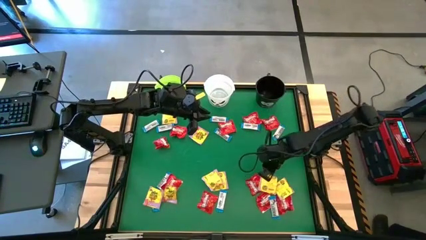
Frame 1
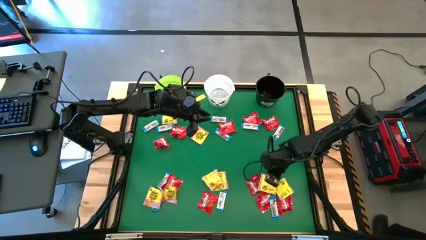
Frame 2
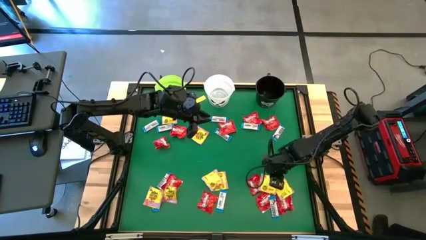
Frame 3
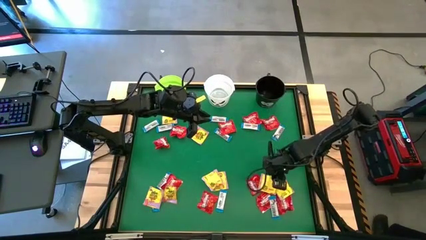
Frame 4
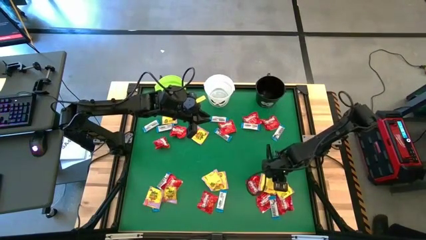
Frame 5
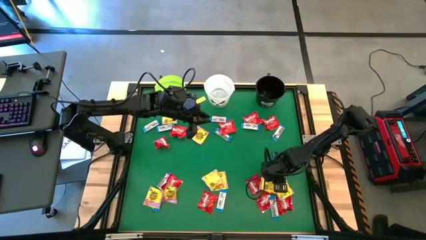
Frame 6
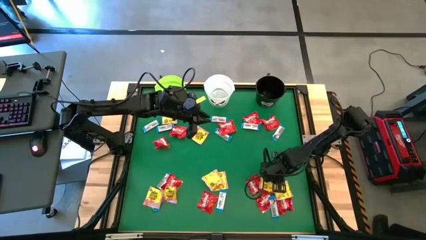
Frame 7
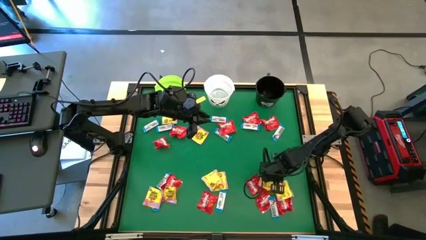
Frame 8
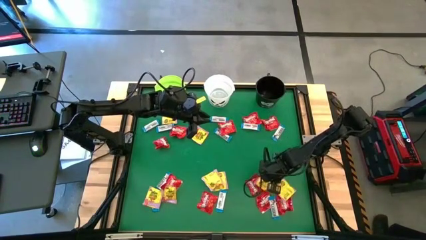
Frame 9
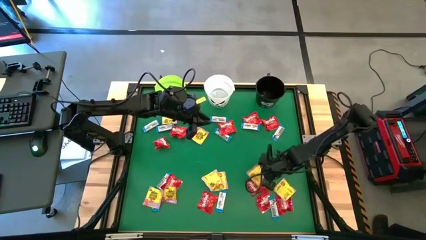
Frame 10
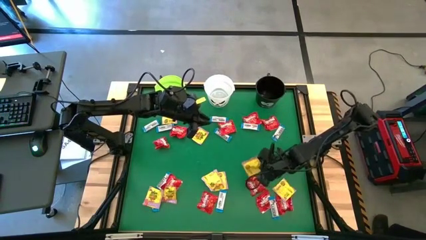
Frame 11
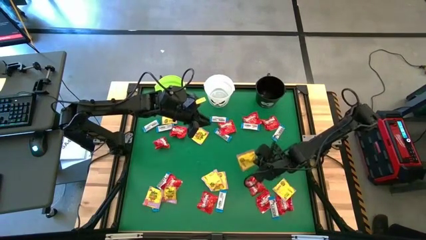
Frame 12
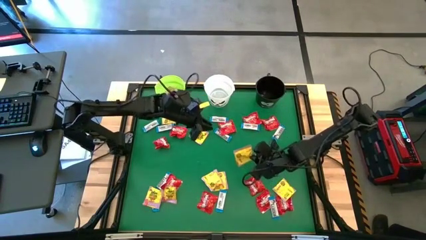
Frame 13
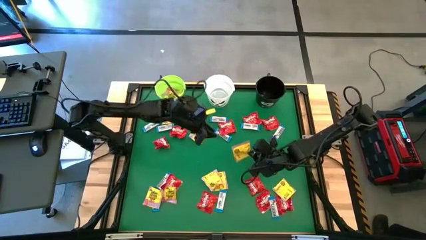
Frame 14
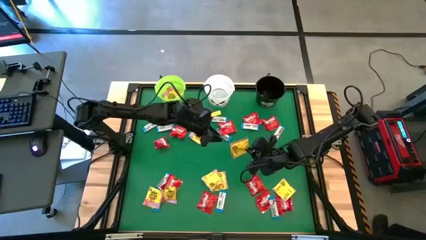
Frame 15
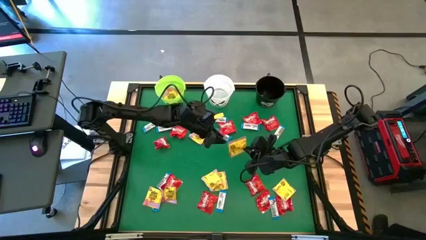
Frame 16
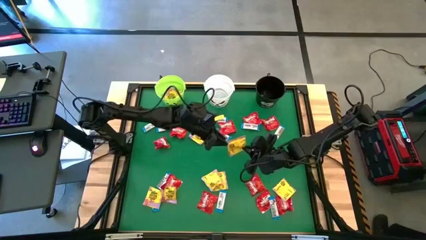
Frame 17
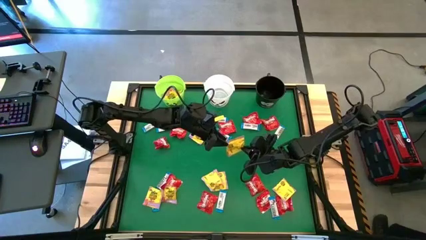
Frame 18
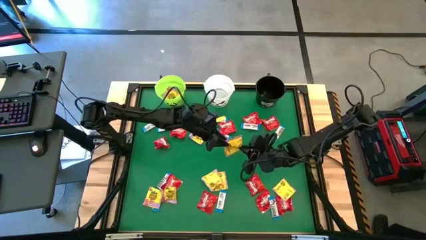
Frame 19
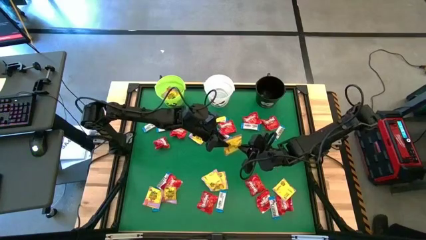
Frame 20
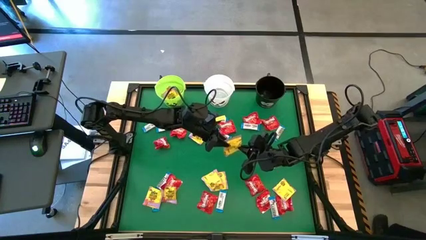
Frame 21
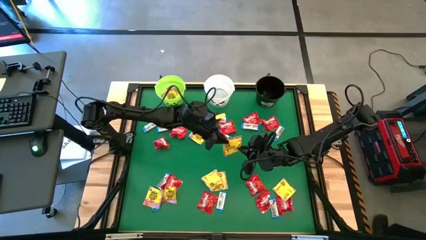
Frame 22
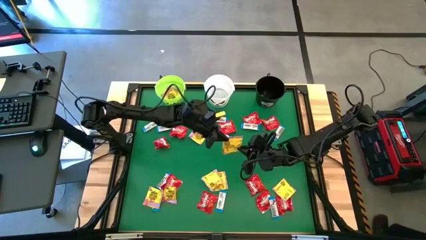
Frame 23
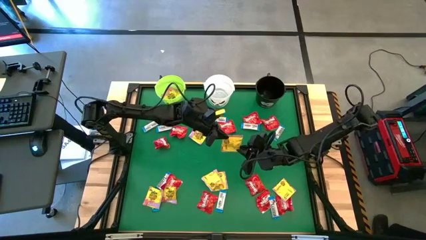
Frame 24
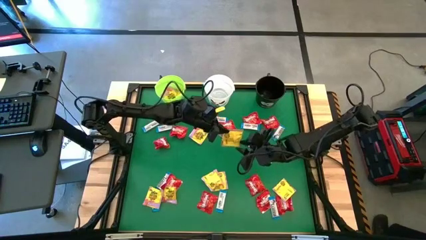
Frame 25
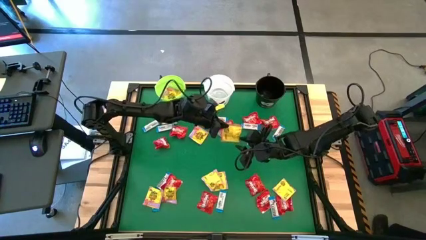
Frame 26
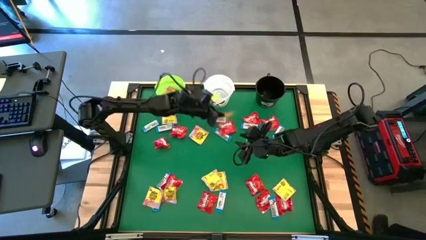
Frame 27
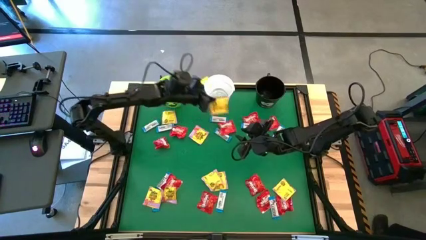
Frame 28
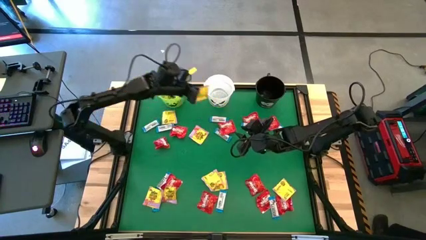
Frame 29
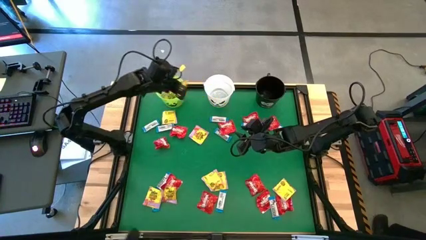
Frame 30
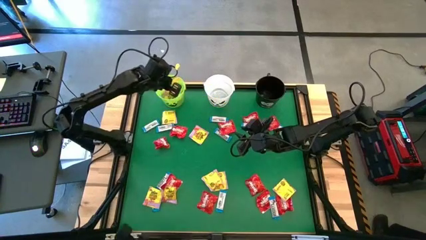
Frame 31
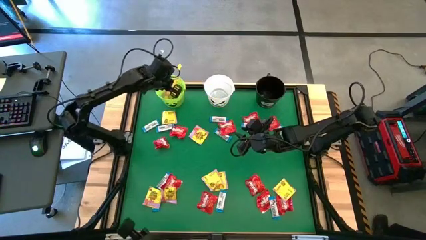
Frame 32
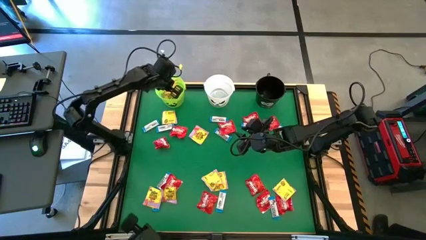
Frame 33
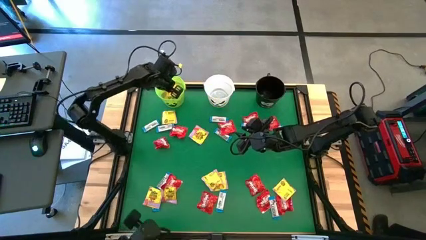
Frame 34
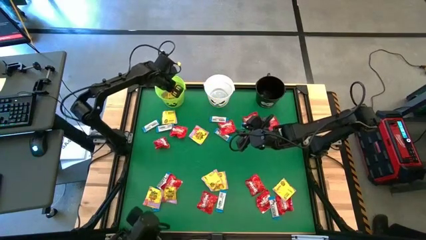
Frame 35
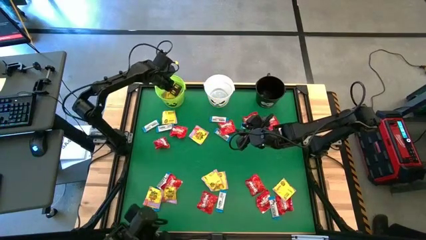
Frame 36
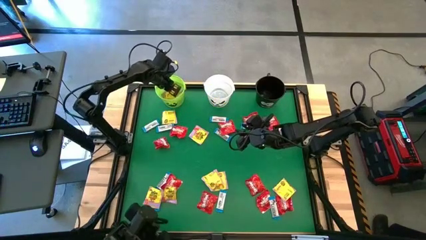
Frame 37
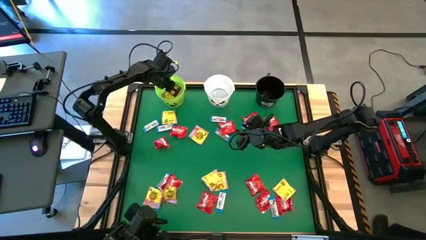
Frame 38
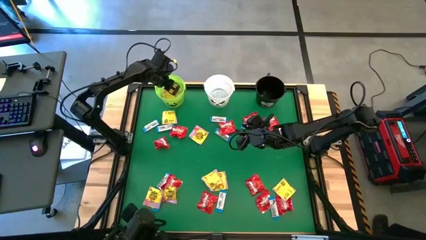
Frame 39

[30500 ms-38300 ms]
Task: Sort candy by brand, put in halloween buckets
Put the yellow candy into the green bucket

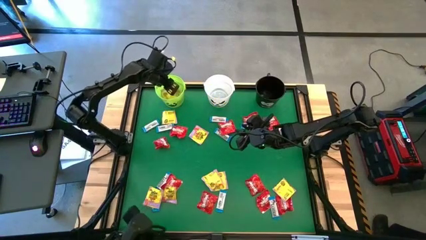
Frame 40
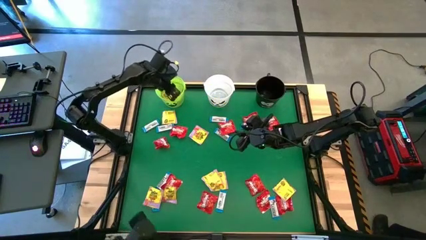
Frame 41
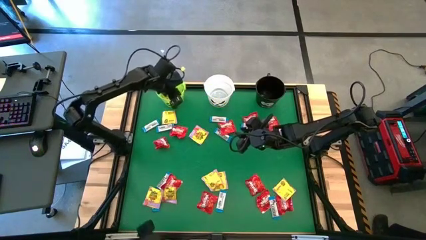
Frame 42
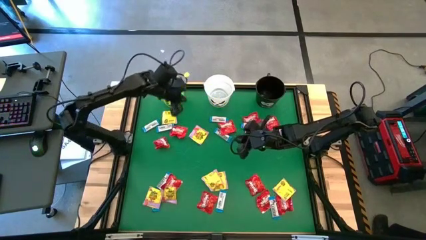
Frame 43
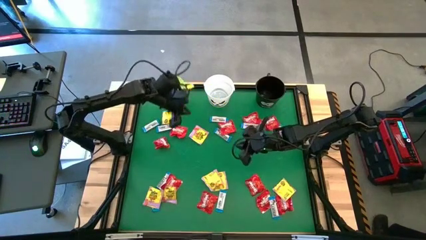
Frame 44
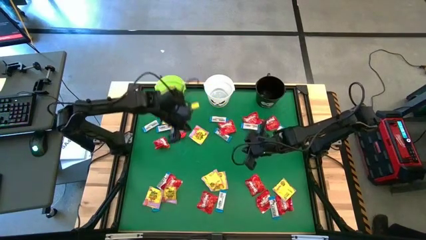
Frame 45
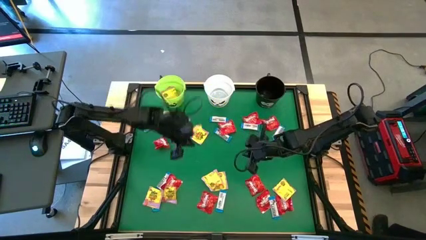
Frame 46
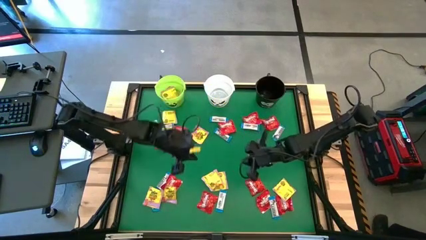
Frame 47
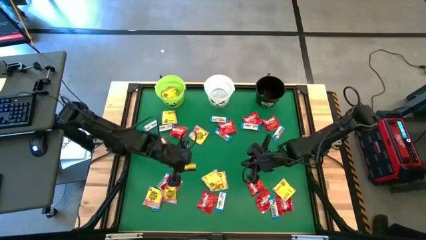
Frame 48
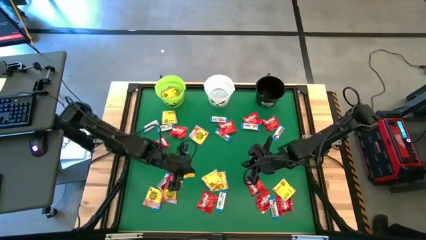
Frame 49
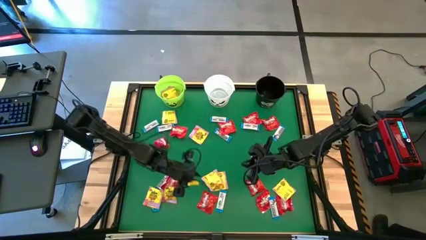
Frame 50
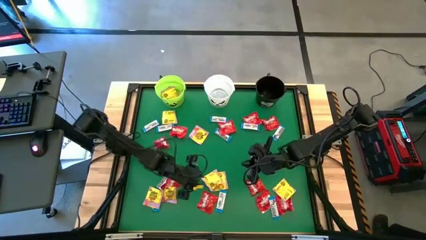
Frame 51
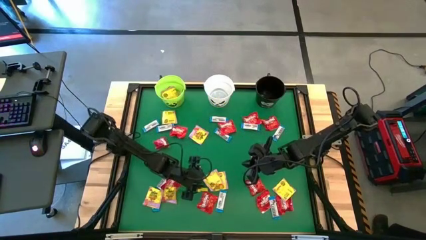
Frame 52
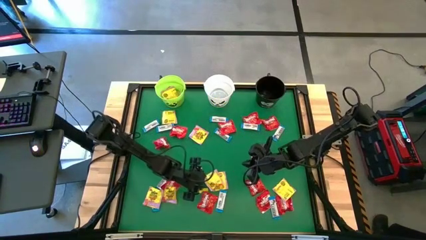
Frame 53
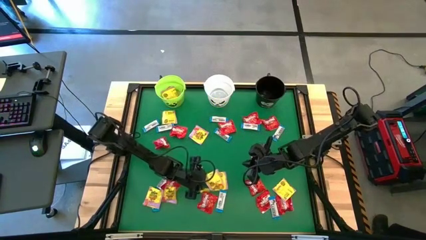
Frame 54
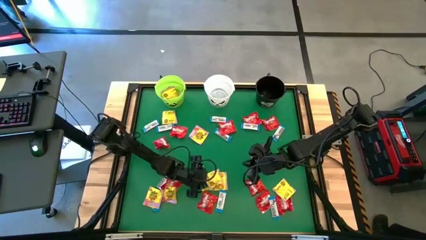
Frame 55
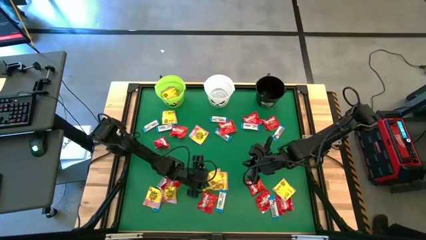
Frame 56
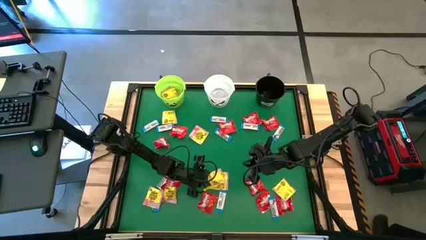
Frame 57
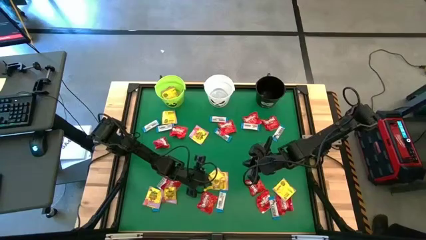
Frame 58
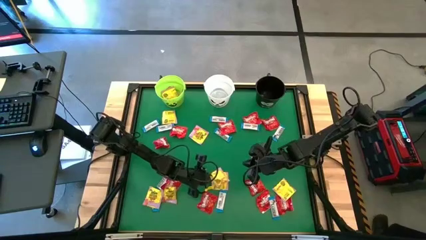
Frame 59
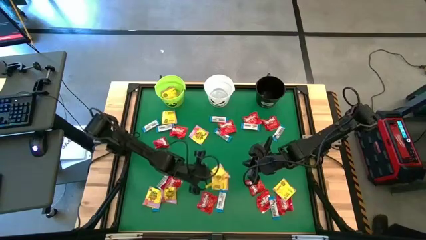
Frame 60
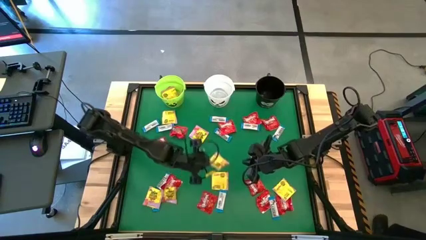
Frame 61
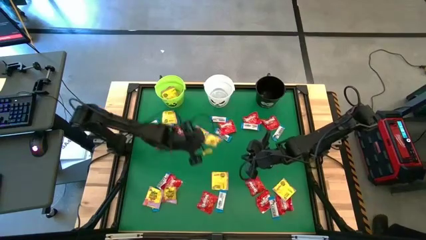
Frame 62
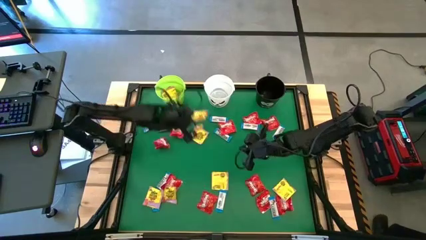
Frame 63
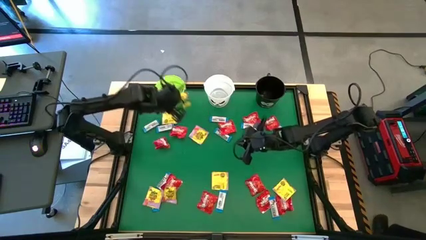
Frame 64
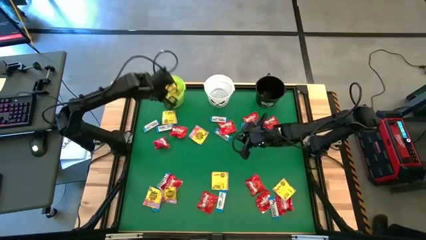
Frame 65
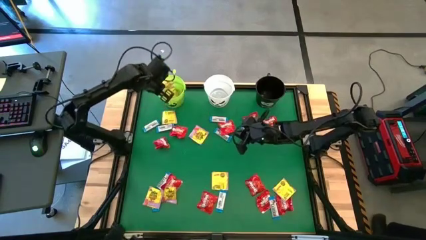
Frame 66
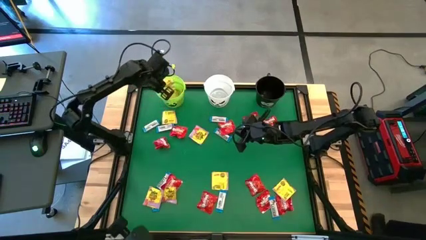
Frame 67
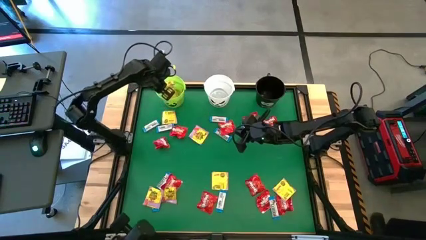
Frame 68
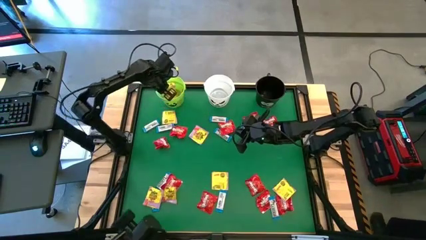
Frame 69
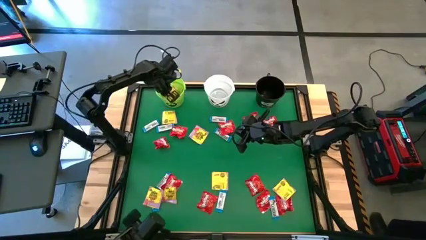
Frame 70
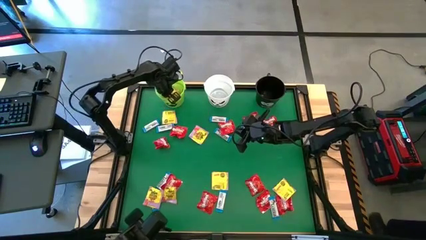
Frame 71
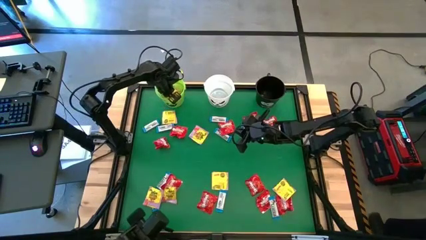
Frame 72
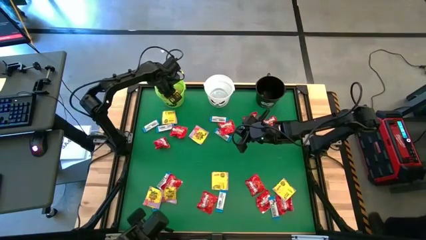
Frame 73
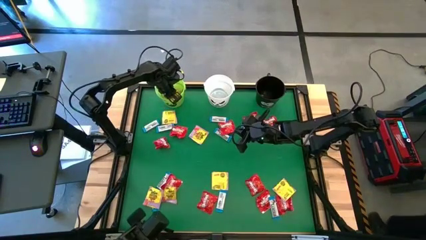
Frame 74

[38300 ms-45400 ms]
Put the yellow candy into the green bucket
